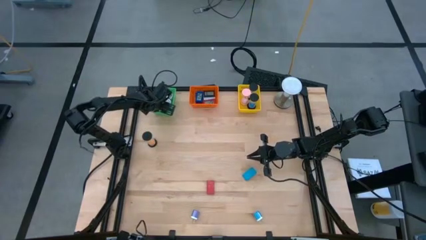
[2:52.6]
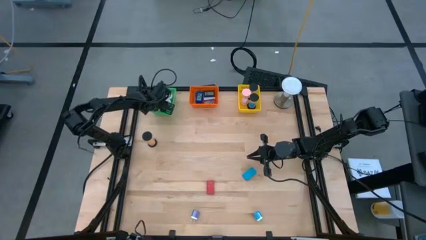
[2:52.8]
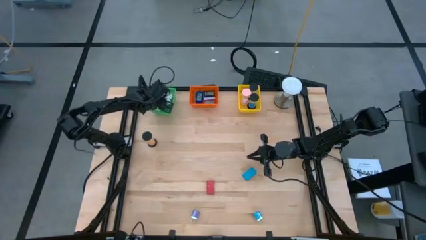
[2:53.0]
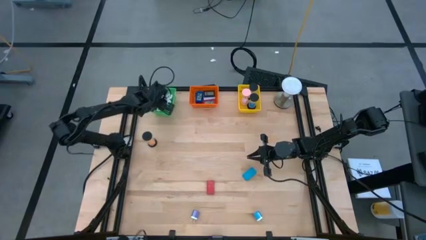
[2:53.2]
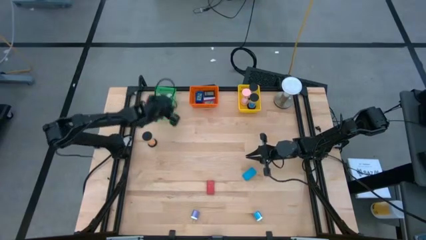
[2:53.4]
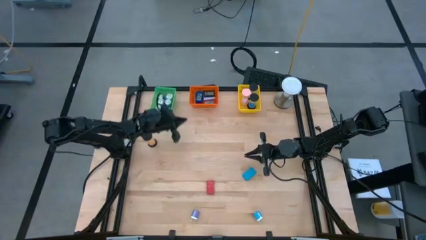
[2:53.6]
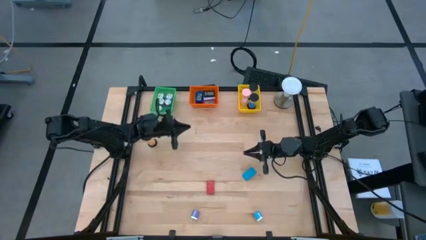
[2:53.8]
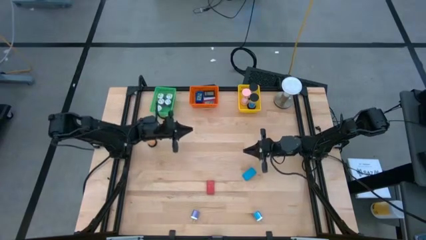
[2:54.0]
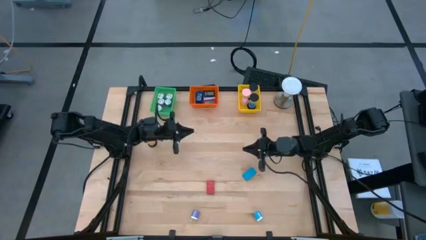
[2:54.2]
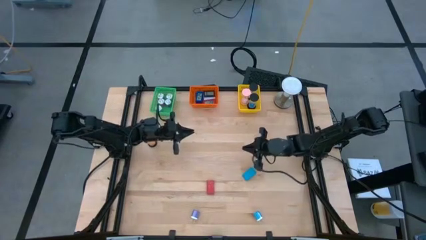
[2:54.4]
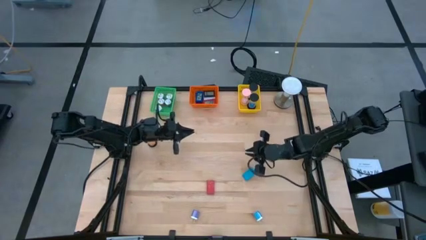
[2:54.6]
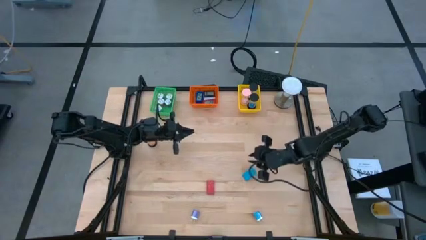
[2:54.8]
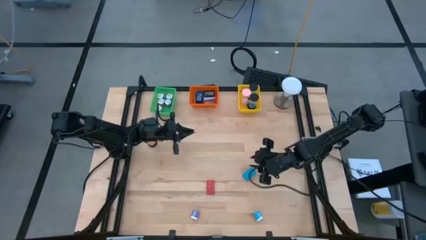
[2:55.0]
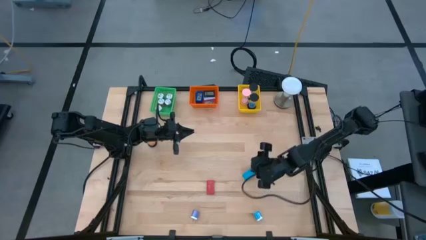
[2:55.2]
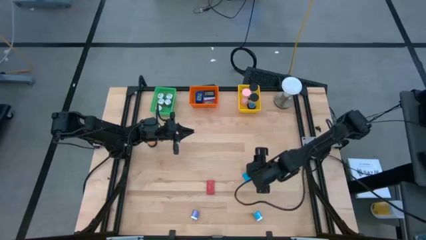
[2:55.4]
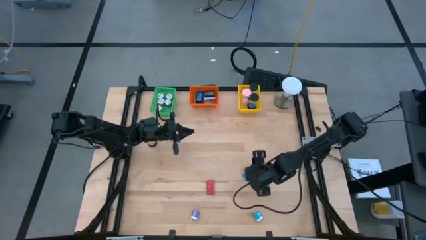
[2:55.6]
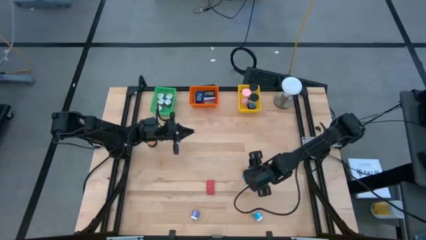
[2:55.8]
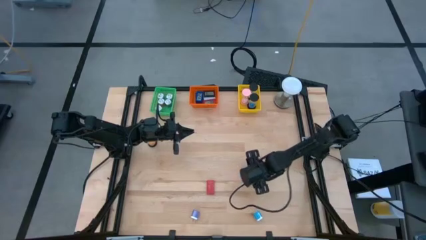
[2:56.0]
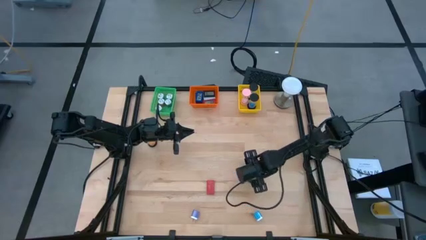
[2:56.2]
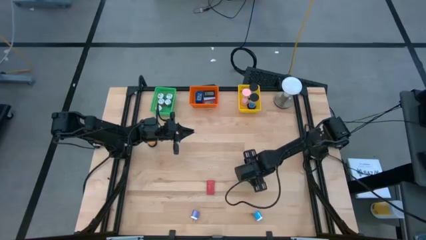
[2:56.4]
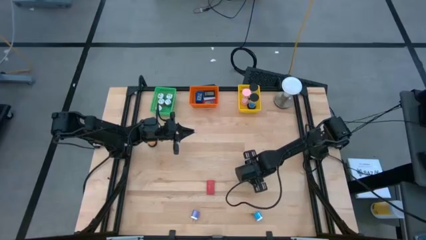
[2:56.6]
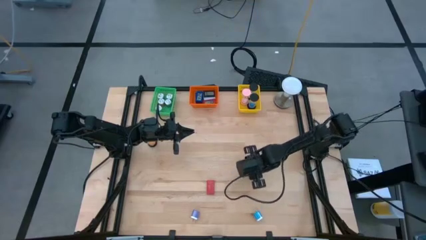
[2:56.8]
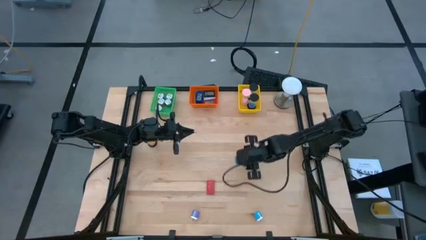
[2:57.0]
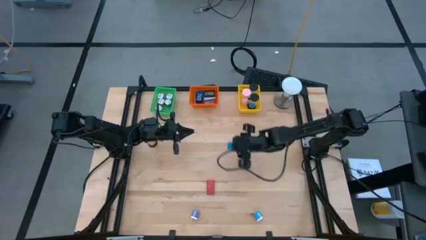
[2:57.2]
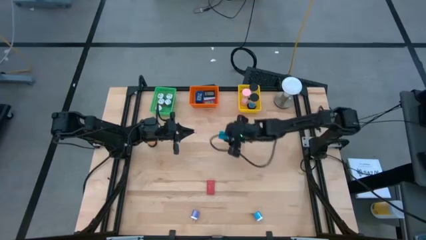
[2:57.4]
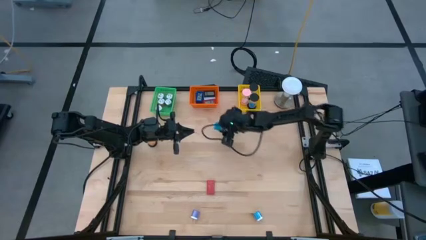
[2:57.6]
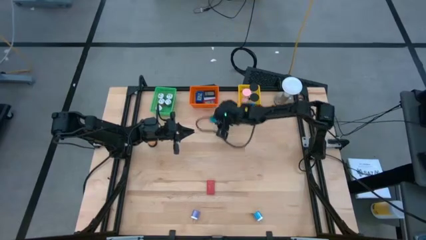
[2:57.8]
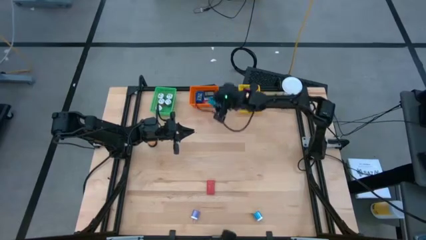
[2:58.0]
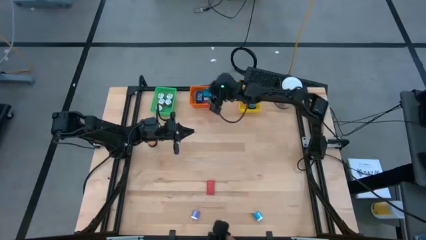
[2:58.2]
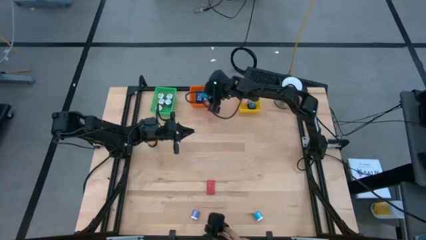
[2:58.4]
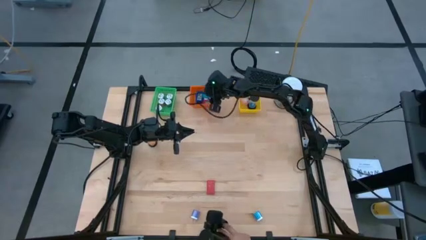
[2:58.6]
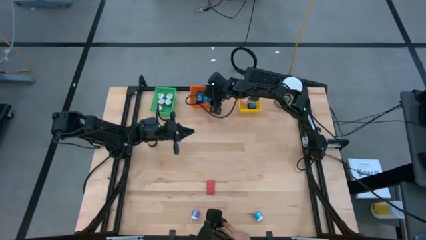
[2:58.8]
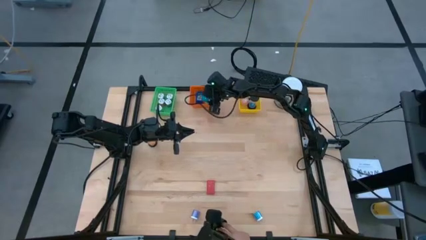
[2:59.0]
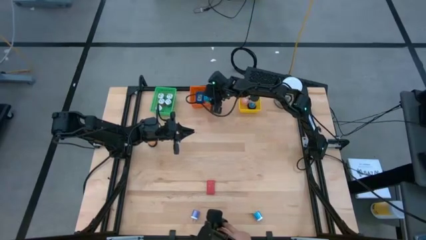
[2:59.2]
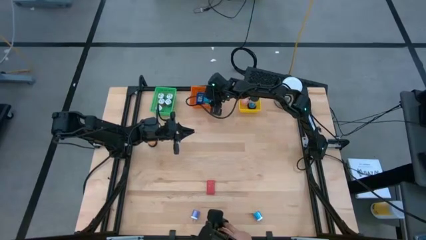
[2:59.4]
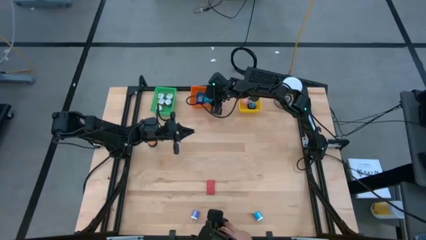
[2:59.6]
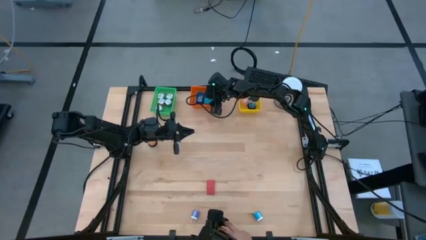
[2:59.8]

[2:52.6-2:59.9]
Task: Pick & Place Office items
Put the light blue digital clock into the orange bin

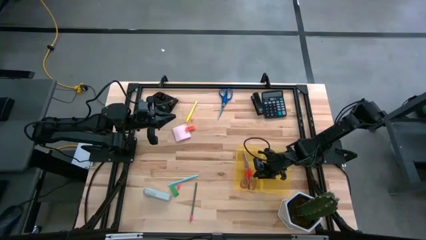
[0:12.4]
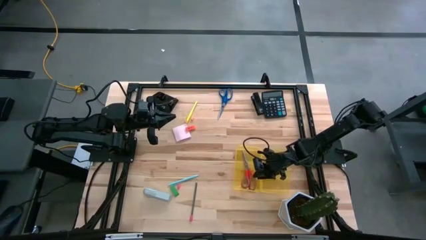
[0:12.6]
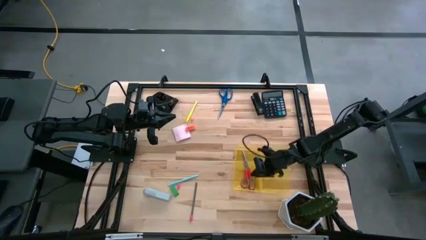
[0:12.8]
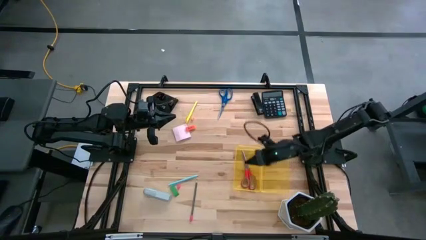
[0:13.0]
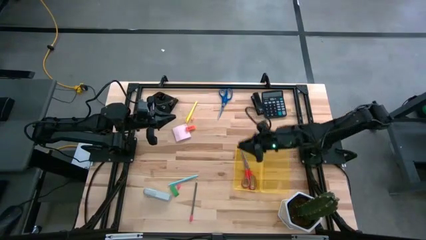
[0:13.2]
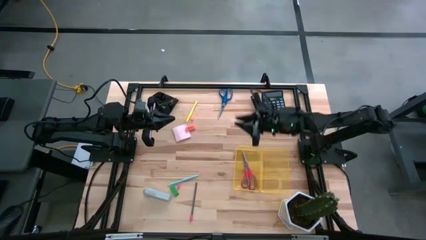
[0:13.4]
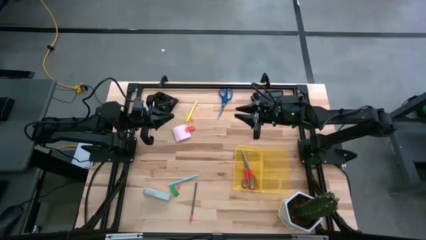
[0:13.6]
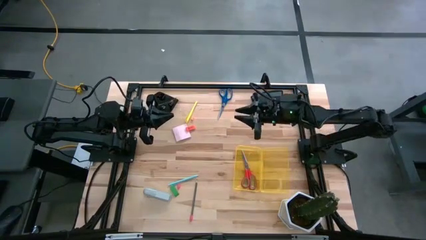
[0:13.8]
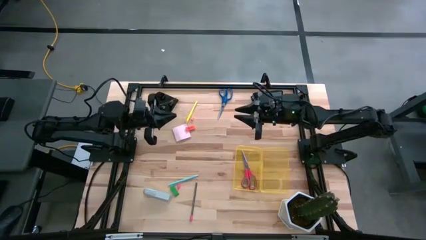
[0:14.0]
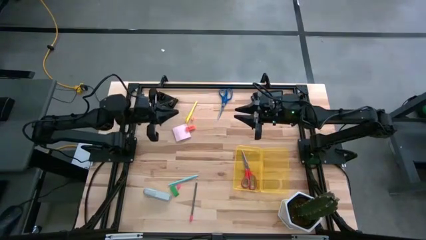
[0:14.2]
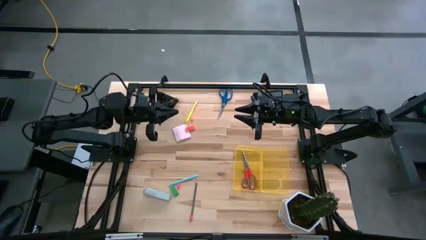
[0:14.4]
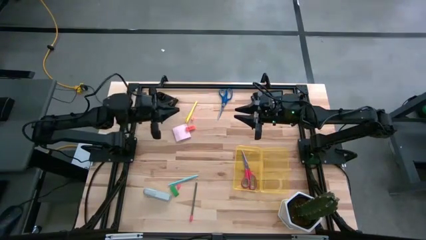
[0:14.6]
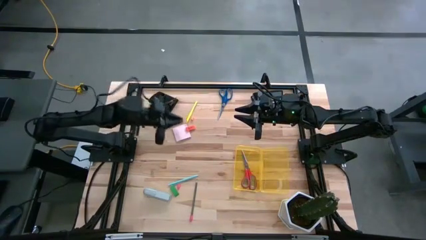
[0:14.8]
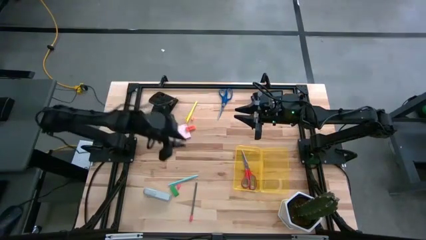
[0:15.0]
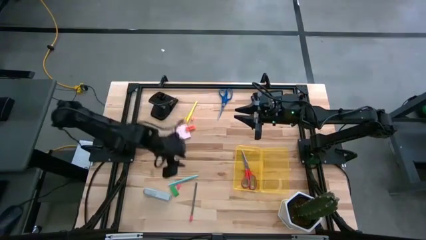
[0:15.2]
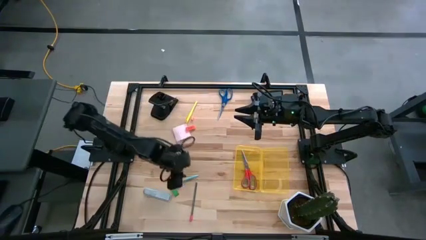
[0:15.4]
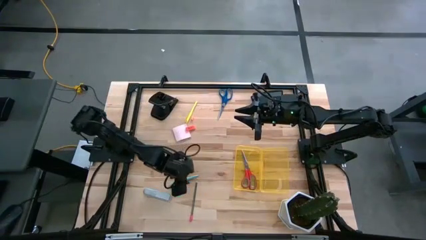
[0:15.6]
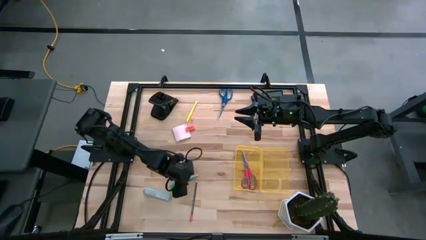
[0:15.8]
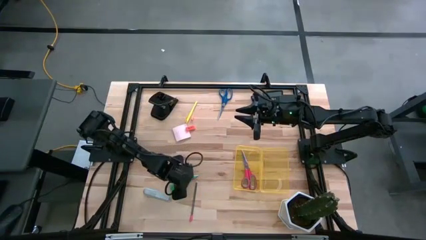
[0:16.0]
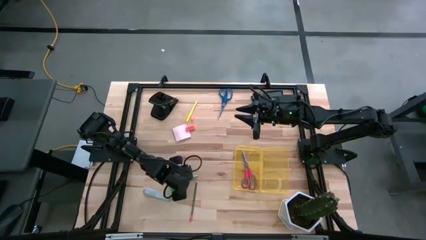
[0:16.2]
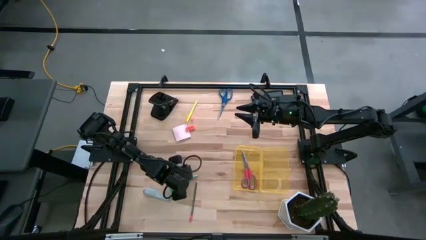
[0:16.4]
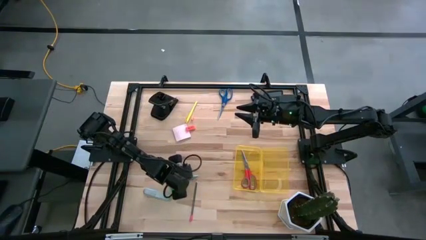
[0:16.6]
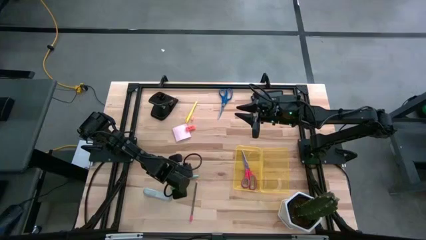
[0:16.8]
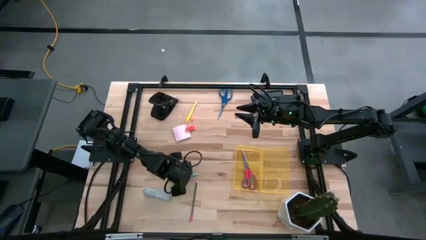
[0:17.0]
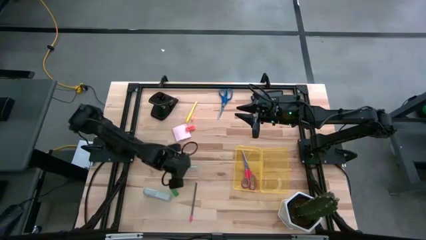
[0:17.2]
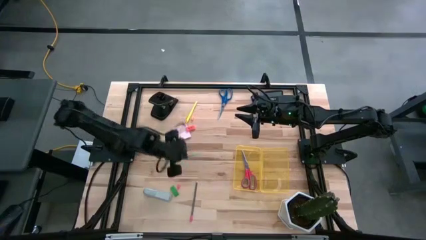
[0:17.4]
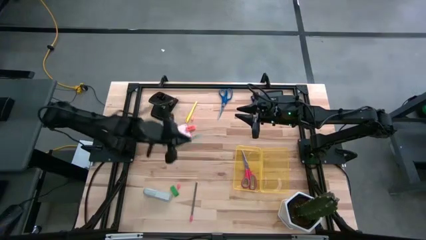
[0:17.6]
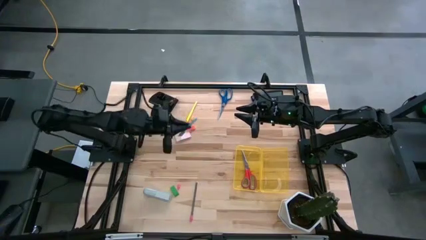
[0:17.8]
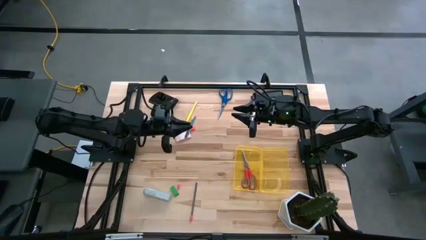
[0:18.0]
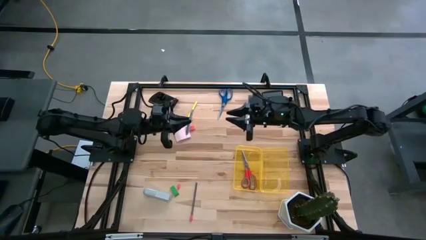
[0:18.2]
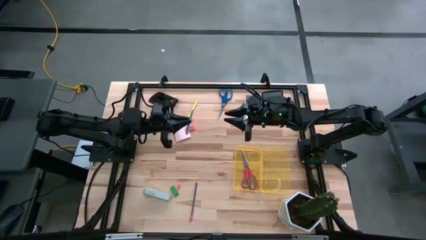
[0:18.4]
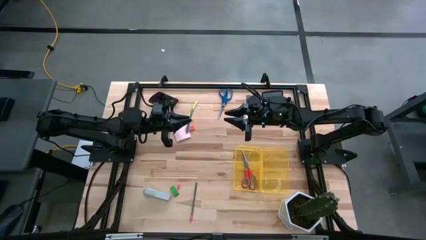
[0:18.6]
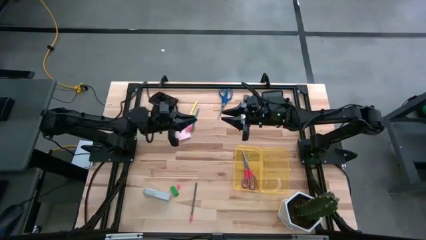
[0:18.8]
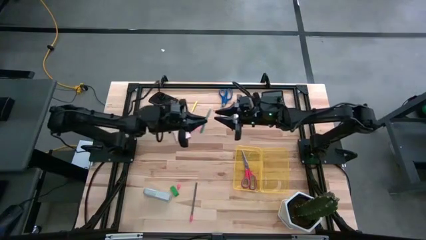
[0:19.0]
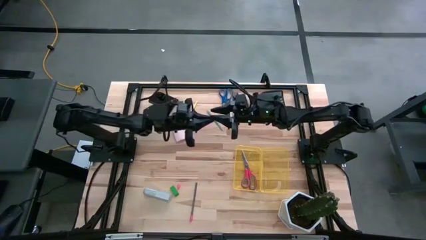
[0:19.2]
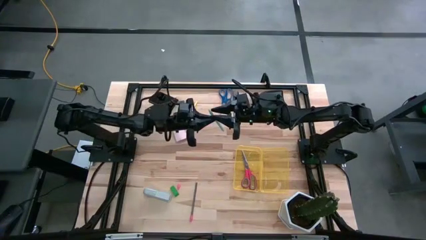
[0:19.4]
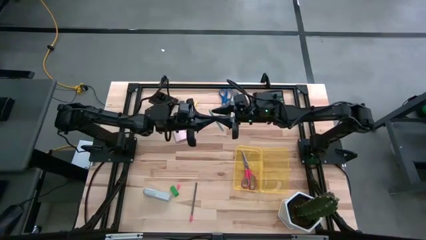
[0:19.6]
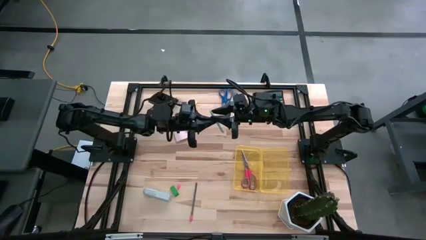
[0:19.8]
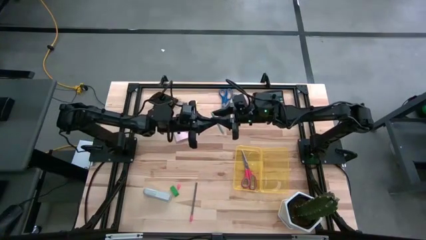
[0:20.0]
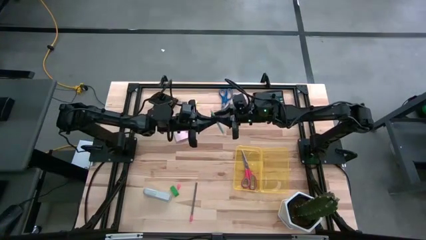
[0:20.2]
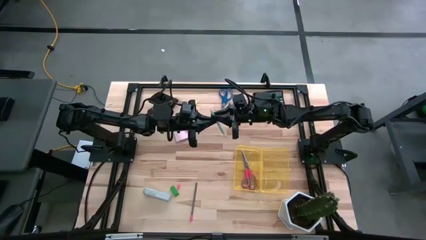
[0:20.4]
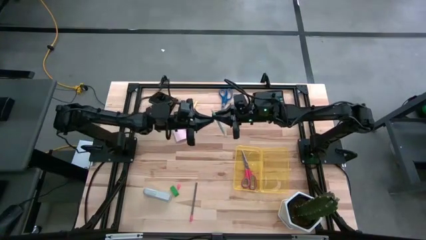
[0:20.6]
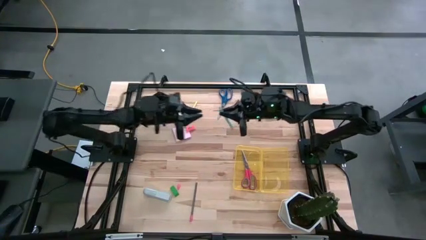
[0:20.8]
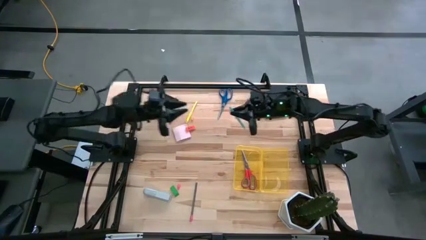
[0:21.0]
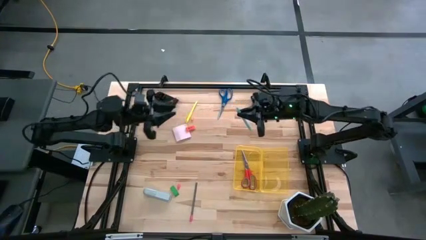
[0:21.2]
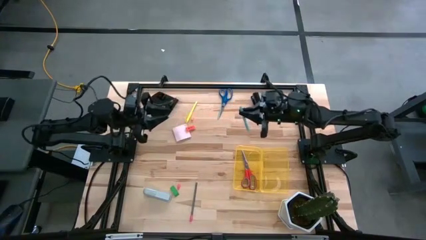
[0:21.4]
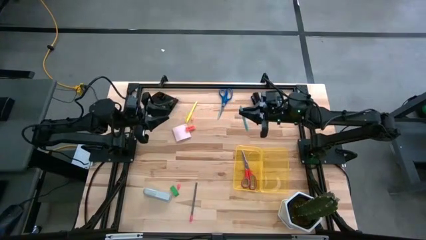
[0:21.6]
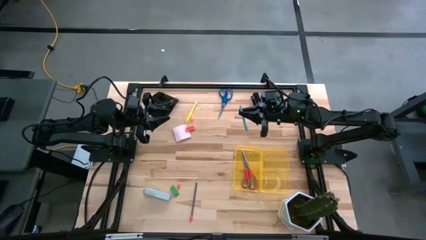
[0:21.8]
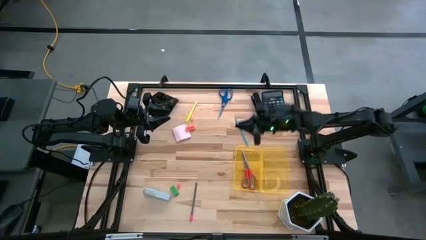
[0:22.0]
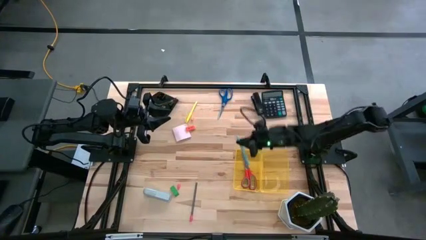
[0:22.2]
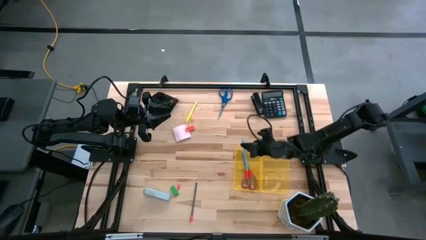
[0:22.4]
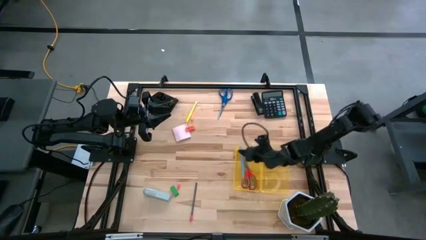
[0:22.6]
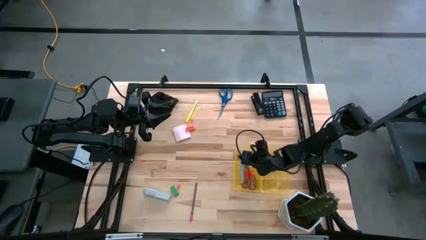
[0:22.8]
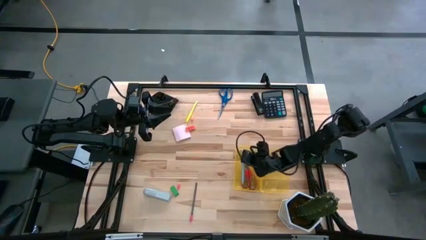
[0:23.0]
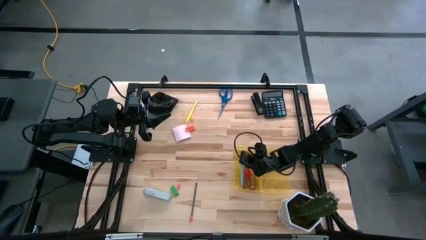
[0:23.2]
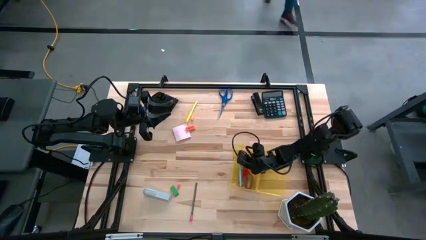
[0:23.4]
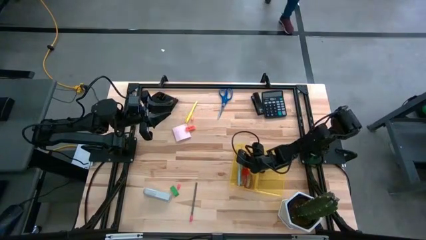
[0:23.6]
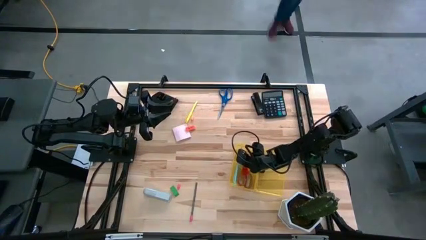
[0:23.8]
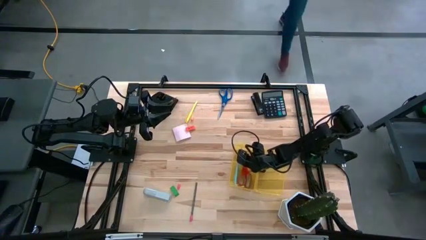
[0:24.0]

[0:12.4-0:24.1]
Task: Pack school essentials
Put the light blue pen into the supply box
